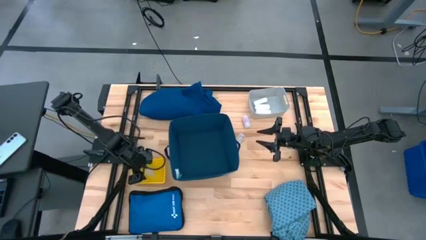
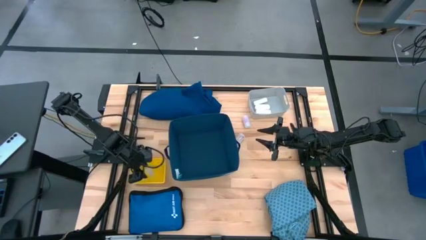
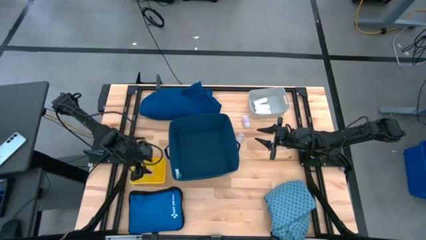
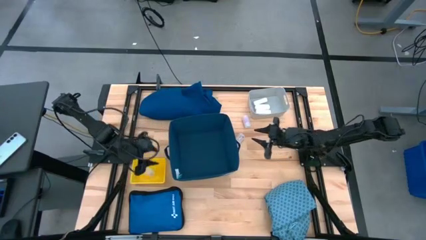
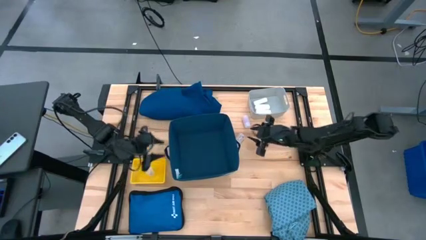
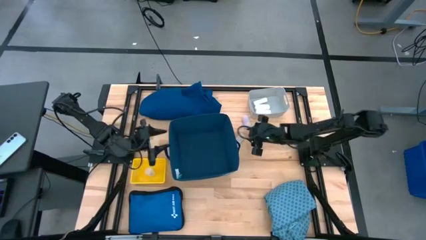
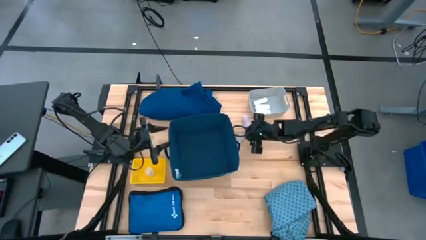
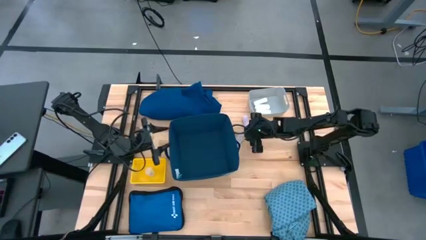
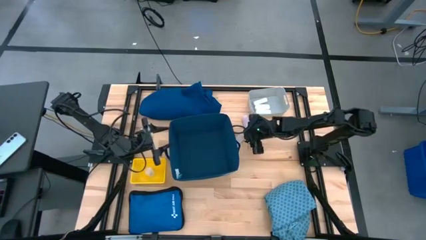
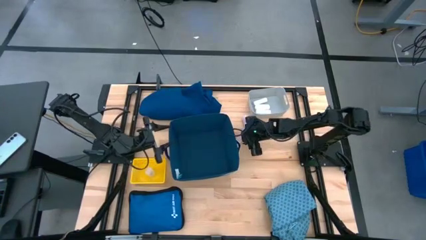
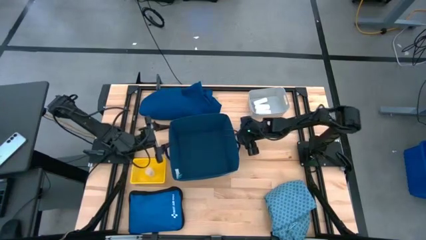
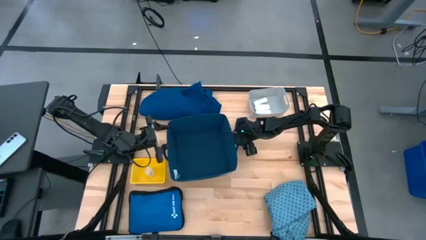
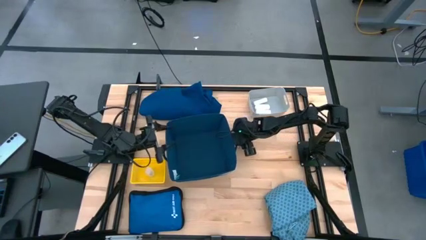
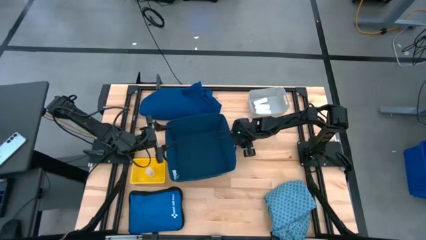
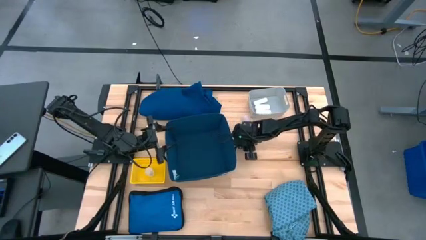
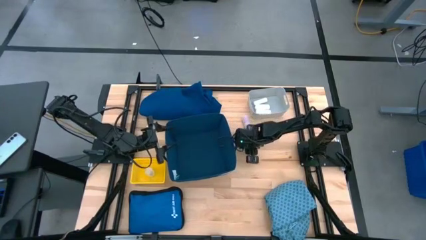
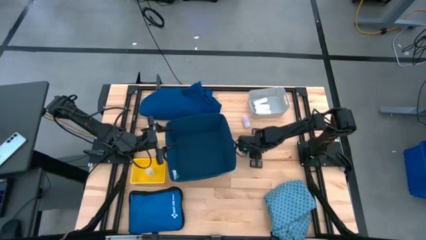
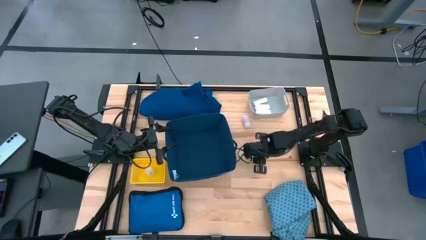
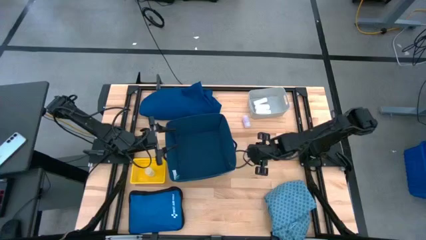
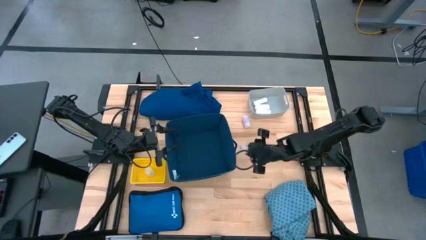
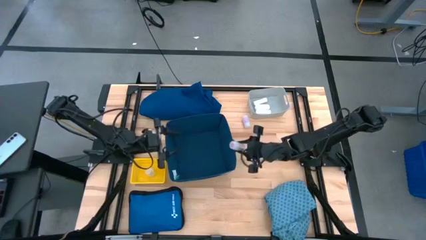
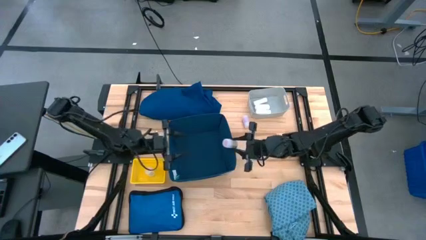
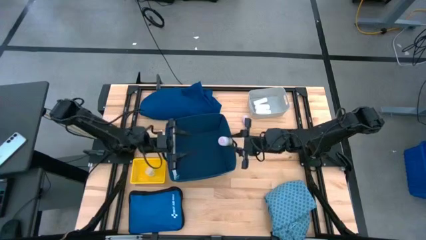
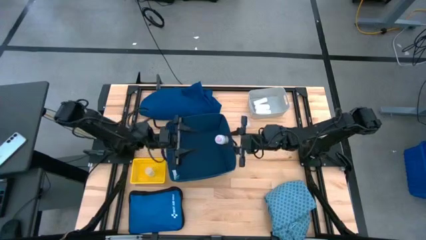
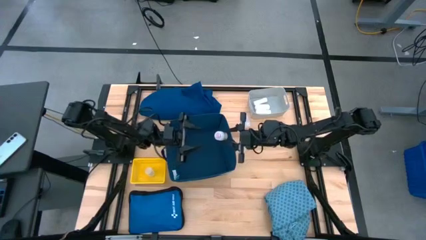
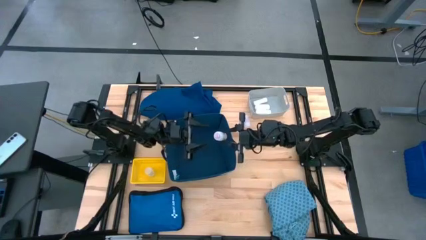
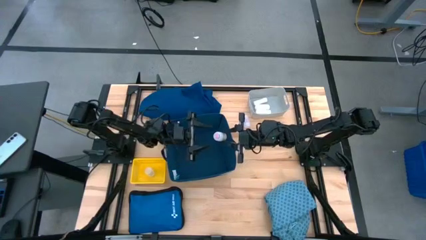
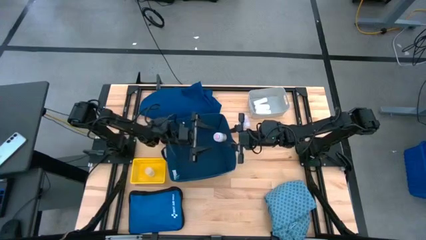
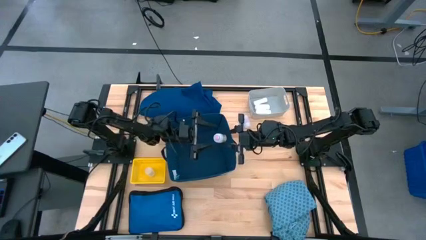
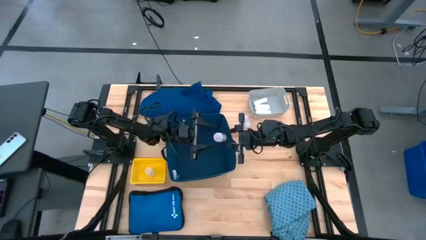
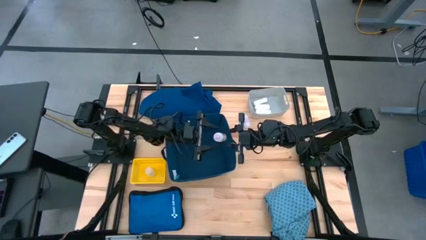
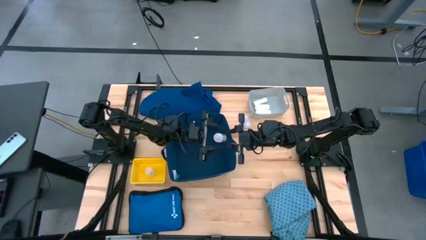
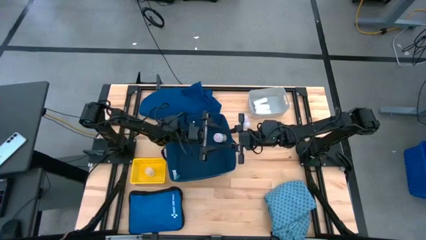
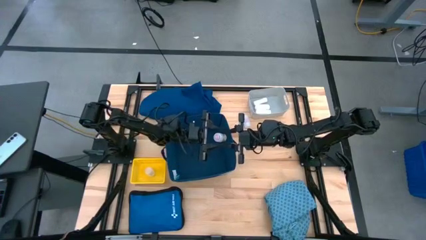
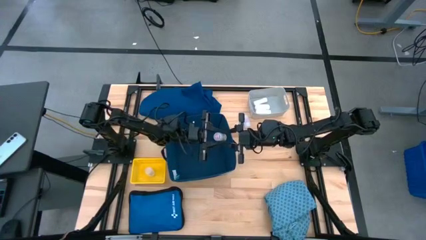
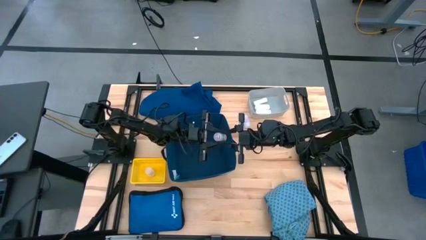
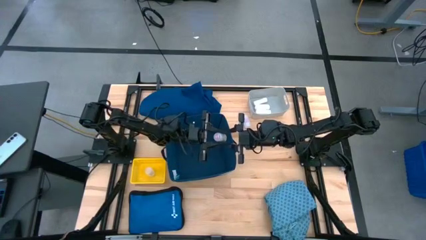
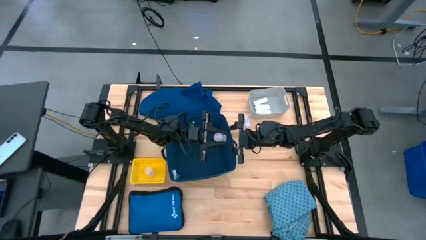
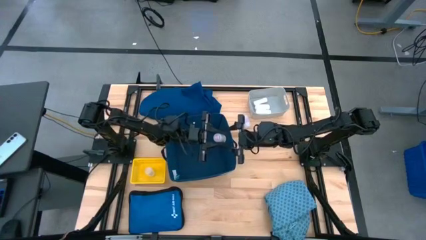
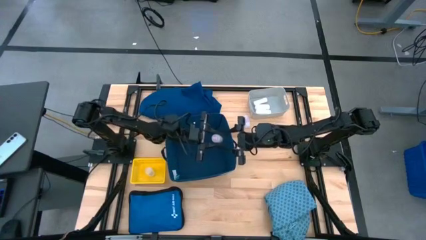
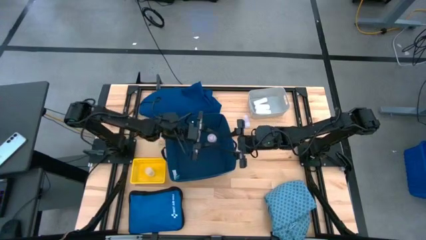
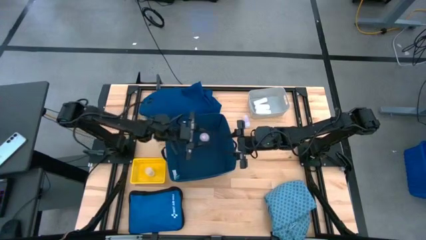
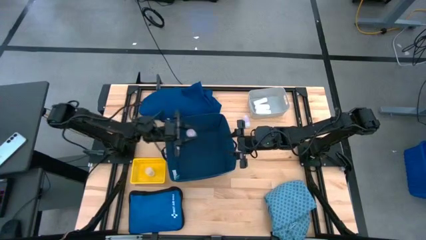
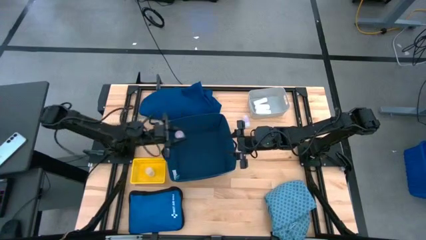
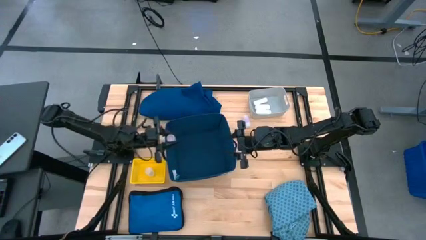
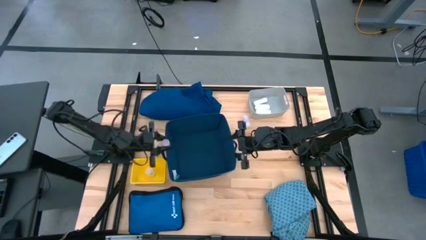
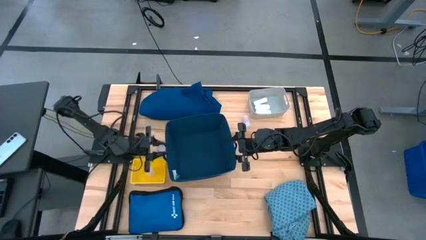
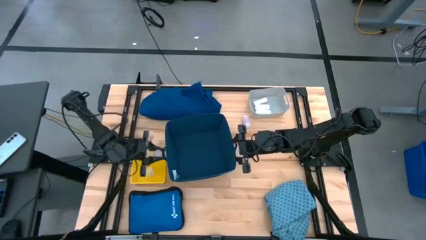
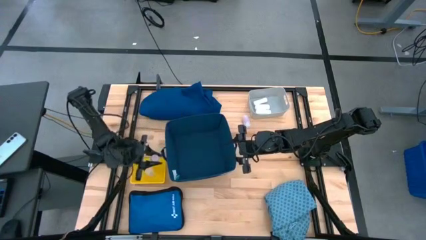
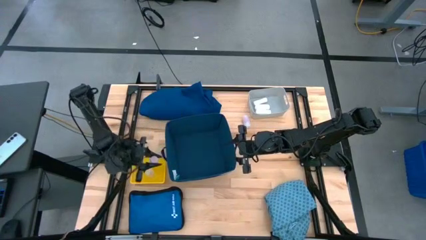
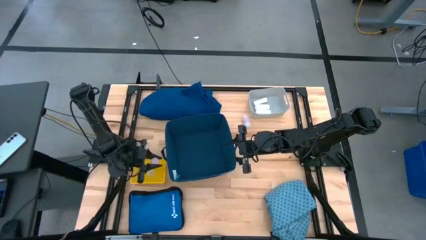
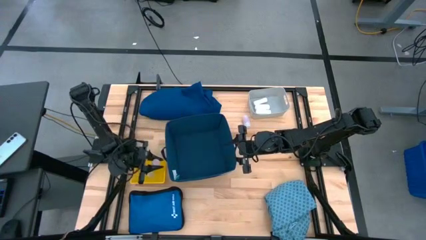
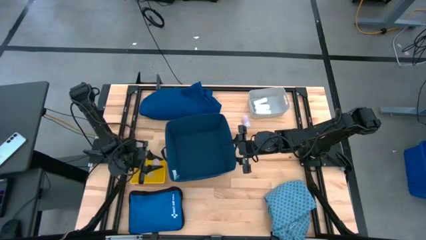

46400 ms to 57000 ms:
Task: Pick & place medical supplies in basket/bin
Put the bottom white medicine bottle into the yellow bin

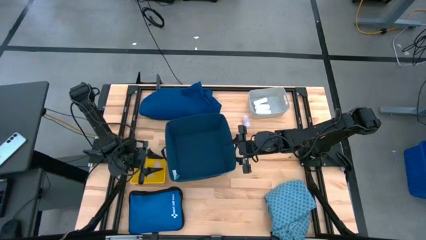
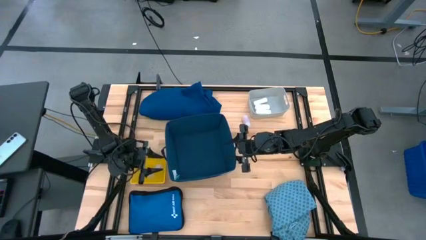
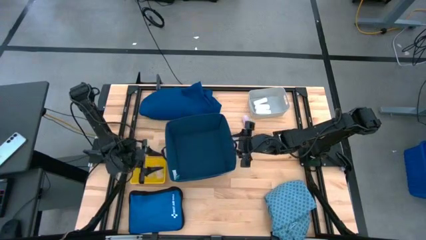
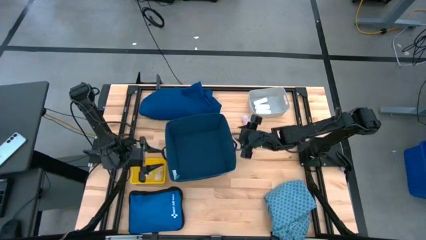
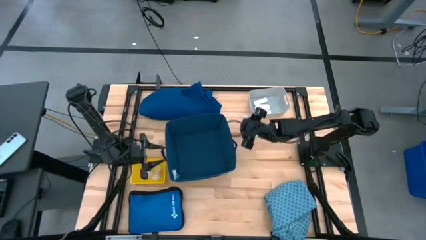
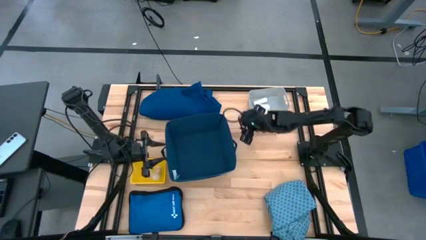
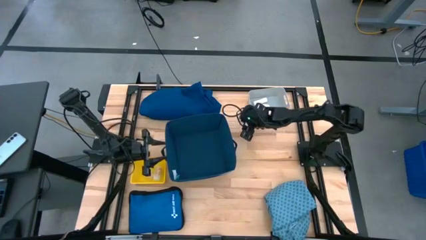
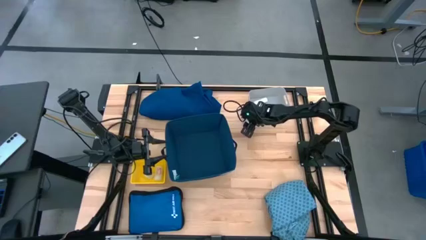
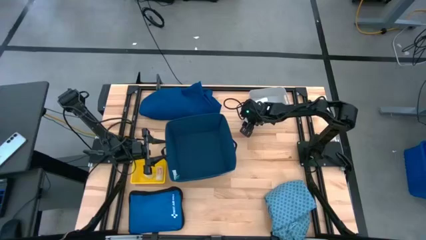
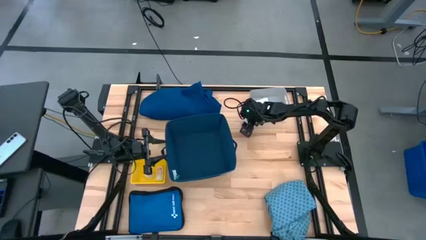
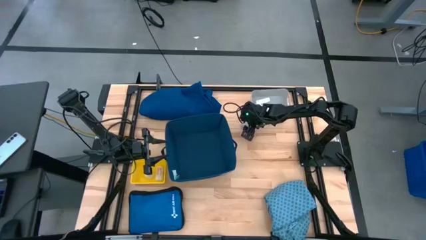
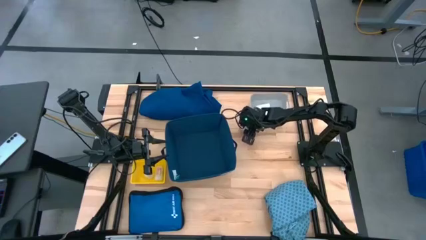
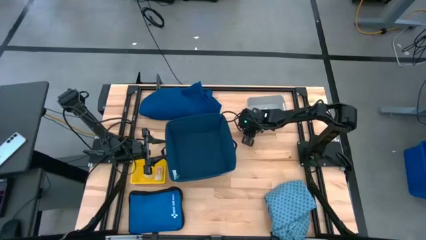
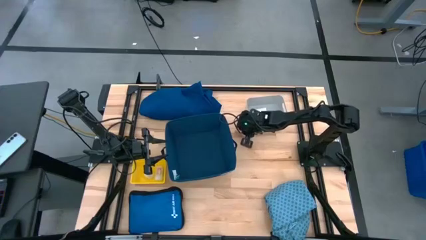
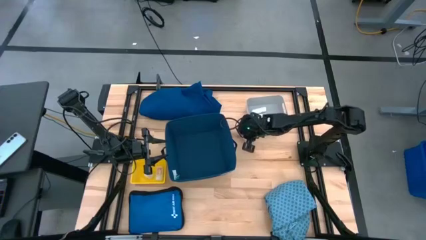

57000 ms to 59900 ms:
Put the white medicine bottle into the yellow bin

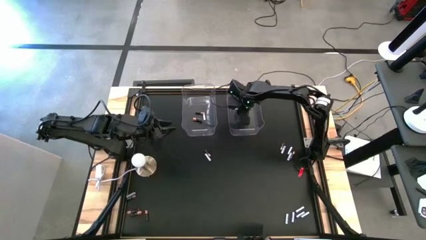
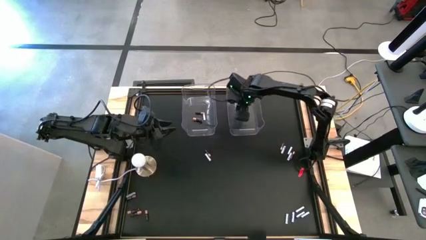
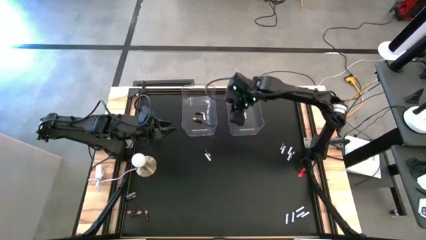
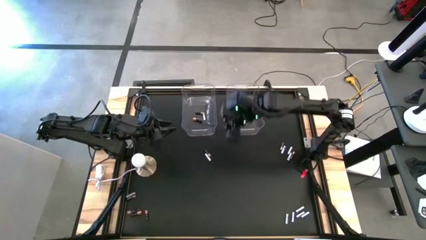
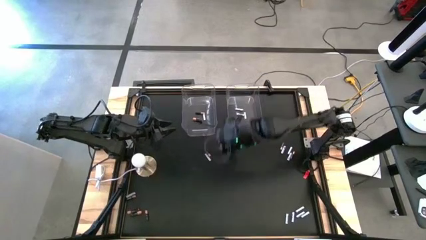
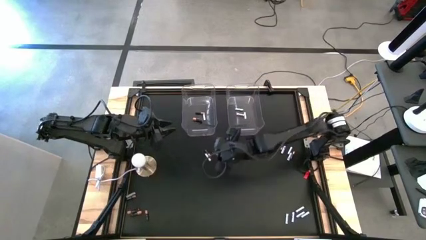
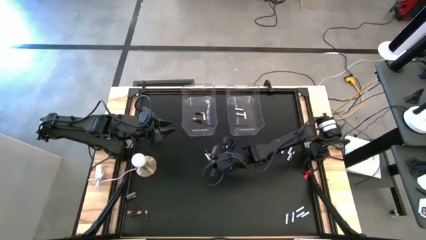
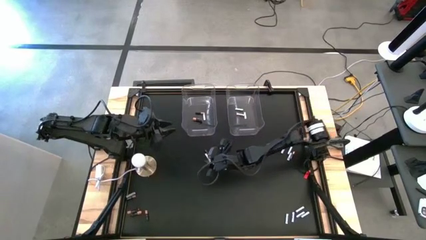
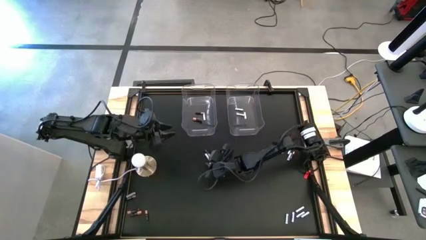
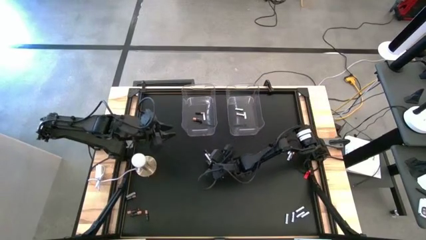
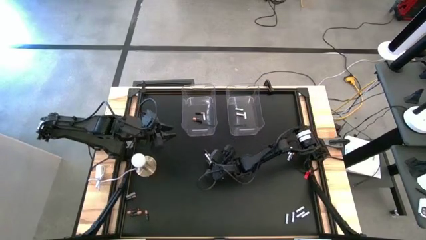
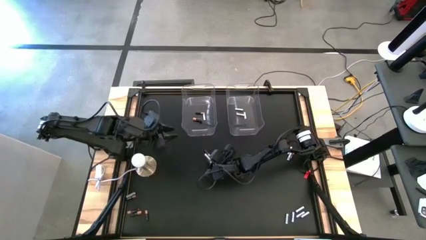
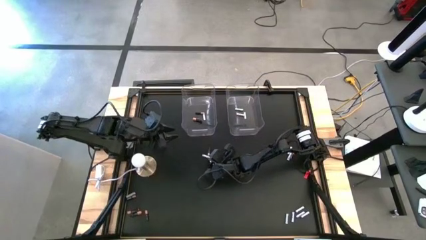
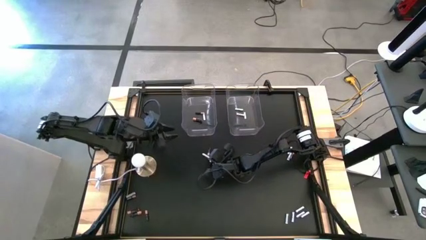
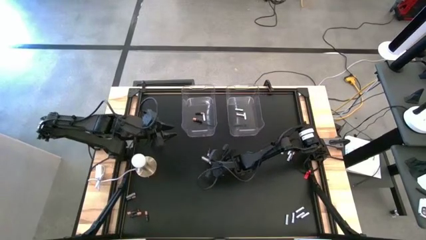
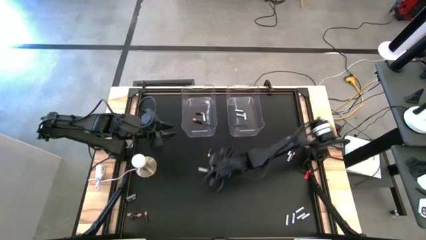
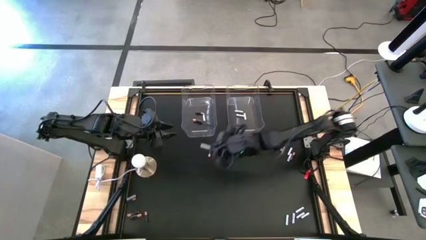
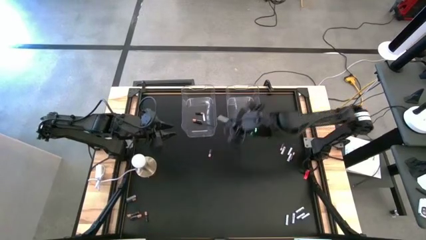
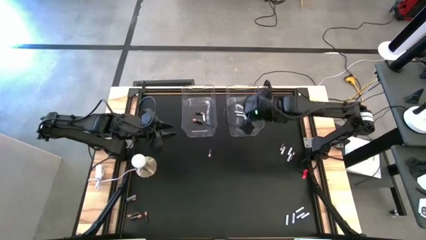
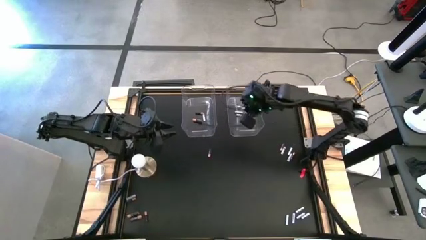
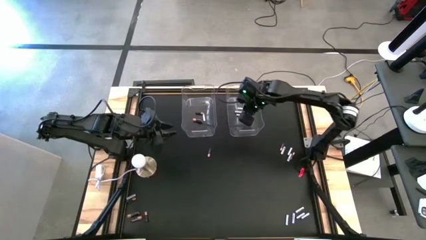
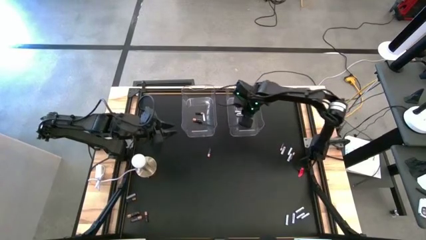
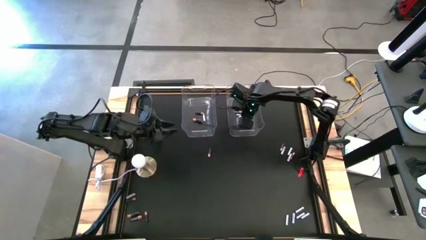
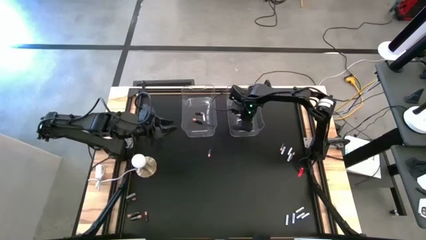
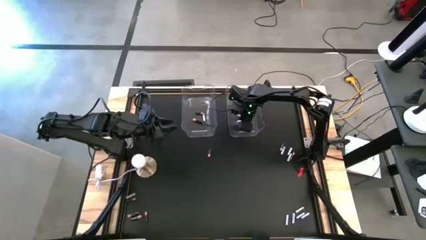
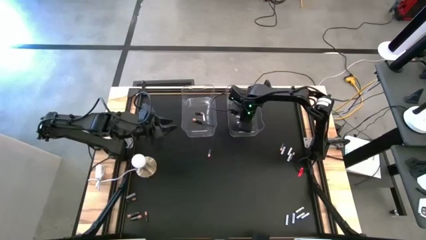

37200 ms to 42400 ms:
Task: Sort batteries
Put the white battery into the right transparent bin
